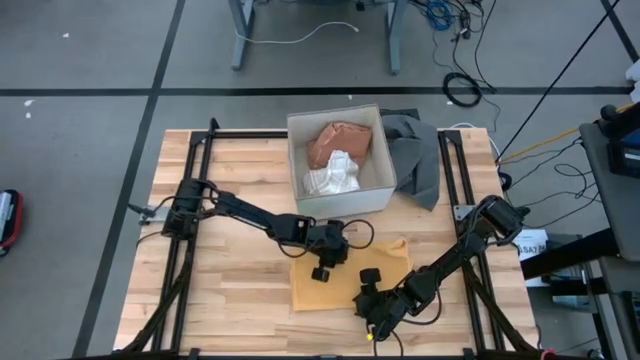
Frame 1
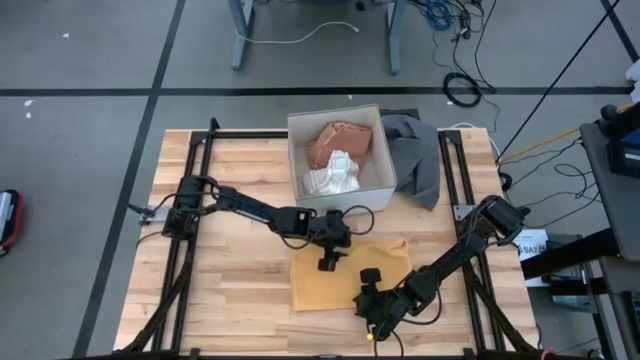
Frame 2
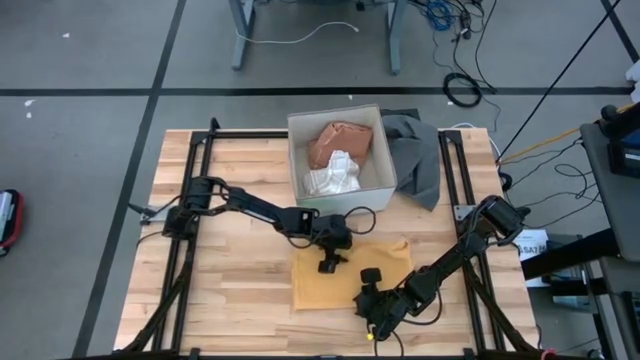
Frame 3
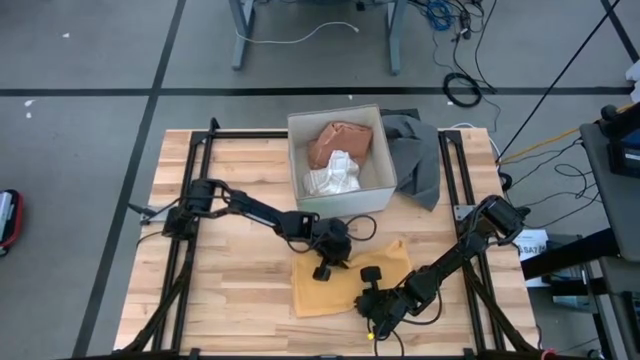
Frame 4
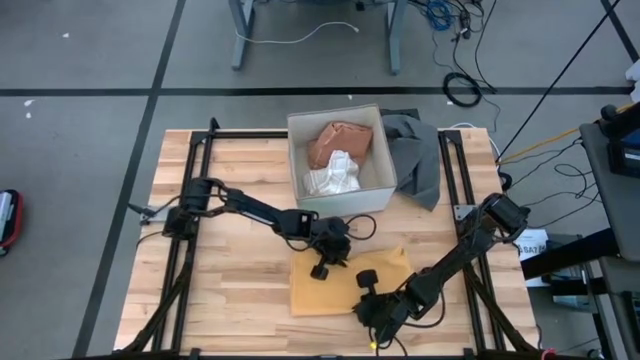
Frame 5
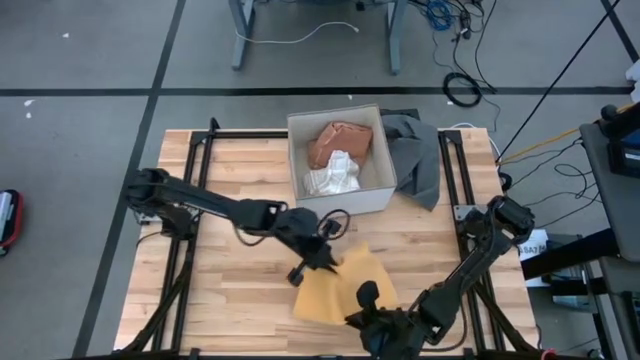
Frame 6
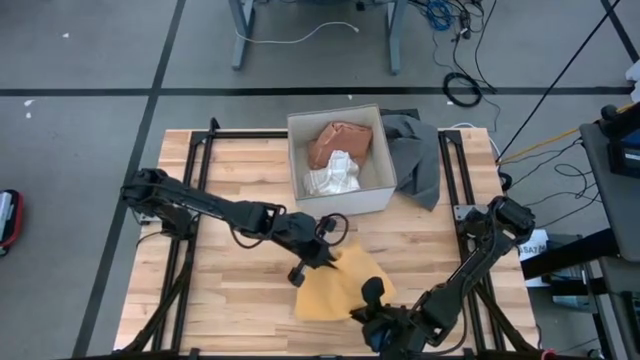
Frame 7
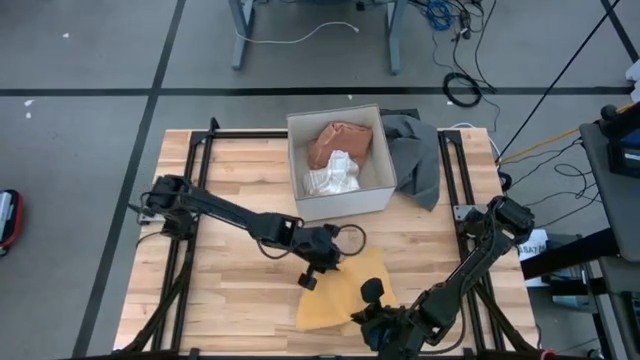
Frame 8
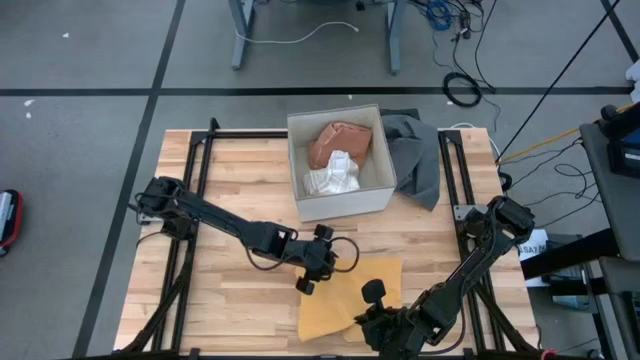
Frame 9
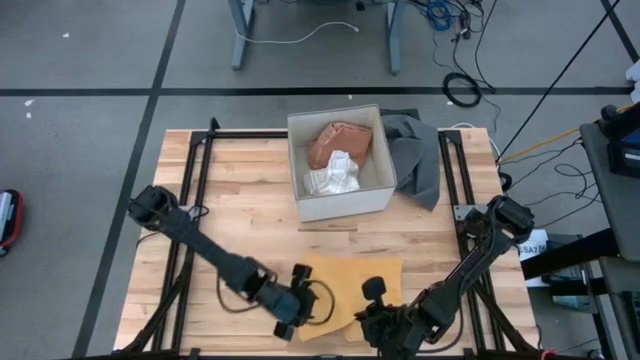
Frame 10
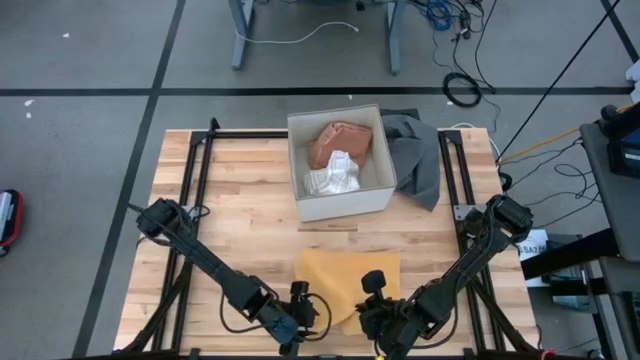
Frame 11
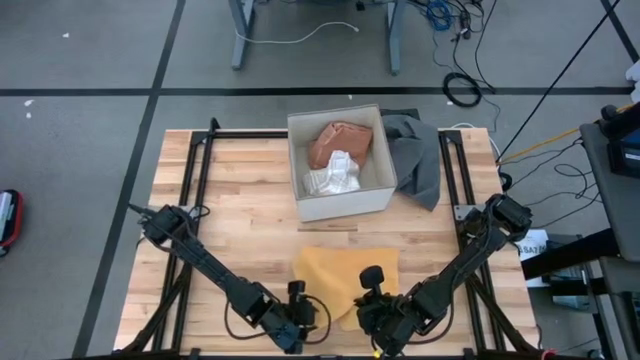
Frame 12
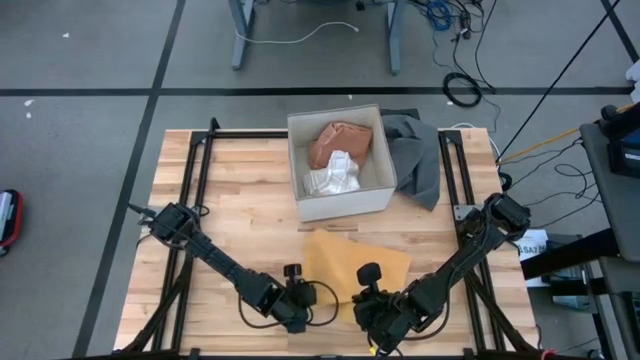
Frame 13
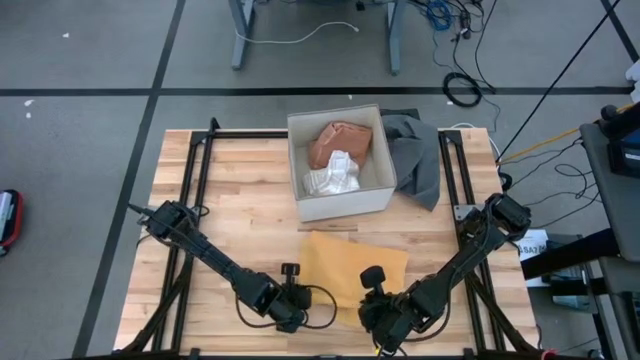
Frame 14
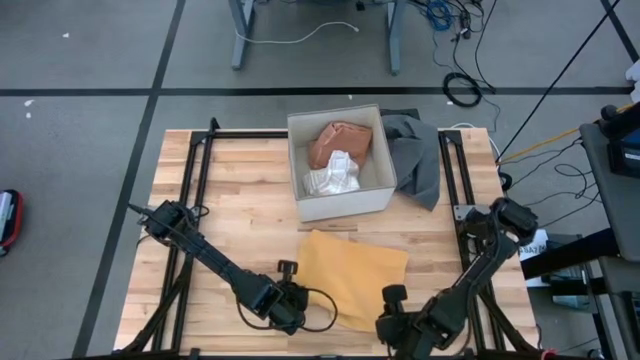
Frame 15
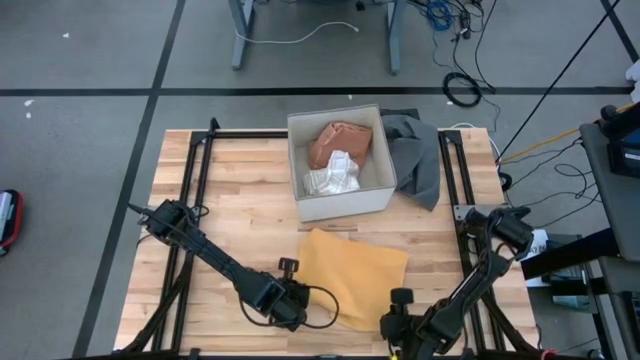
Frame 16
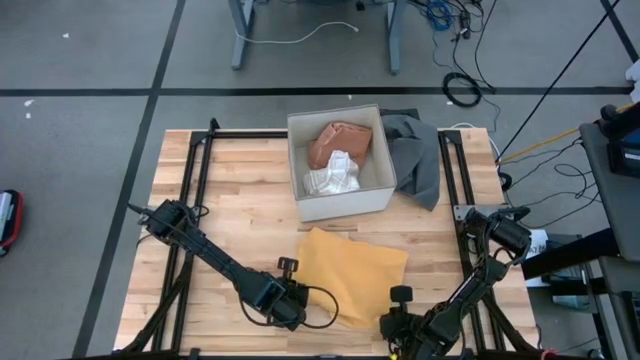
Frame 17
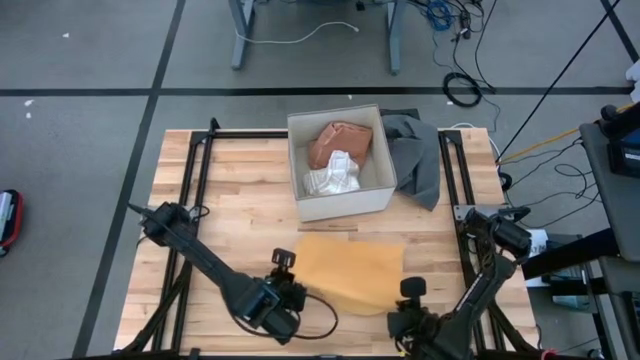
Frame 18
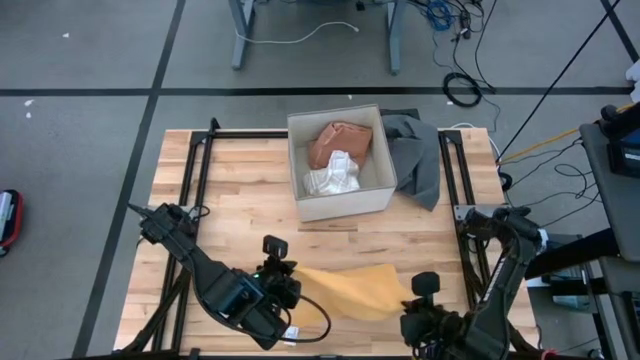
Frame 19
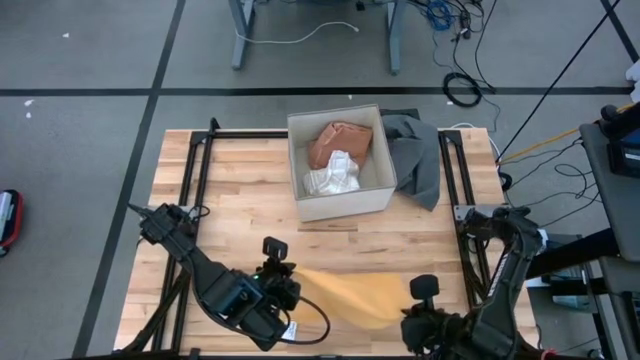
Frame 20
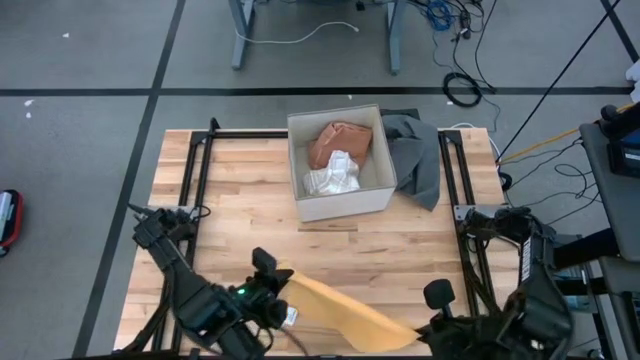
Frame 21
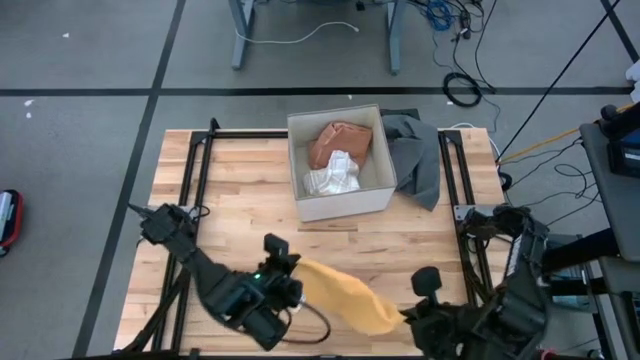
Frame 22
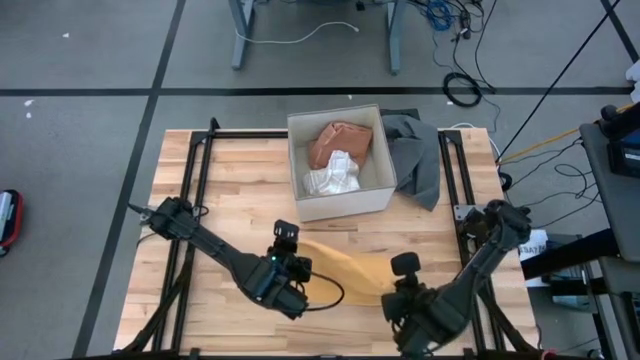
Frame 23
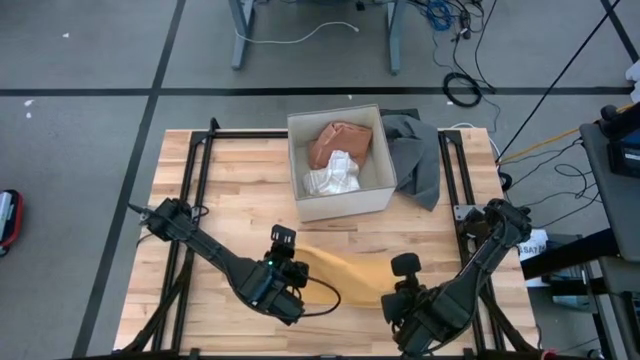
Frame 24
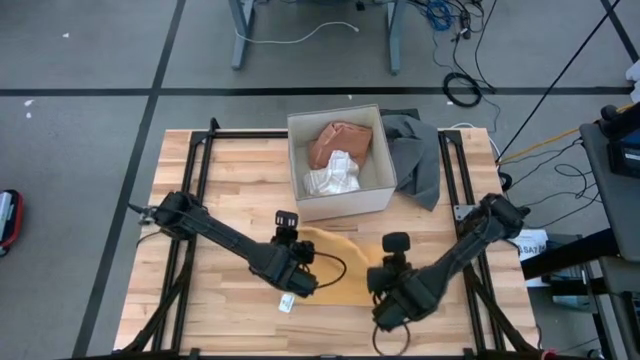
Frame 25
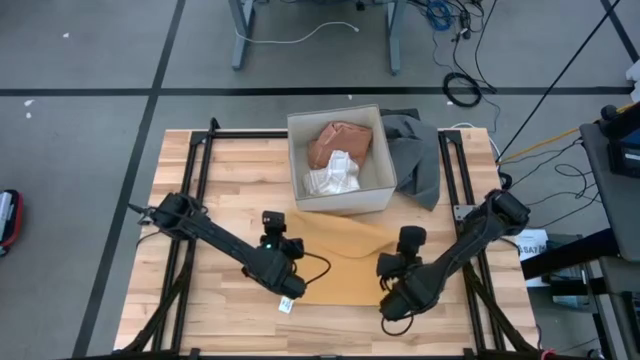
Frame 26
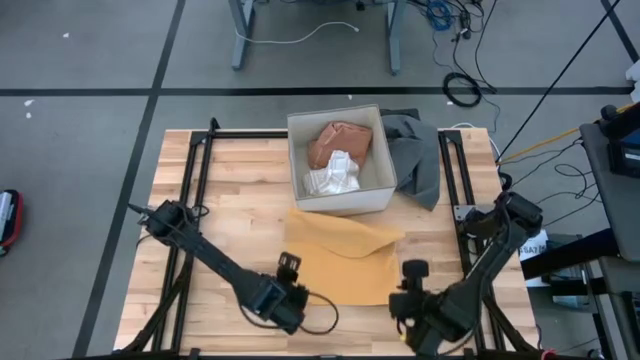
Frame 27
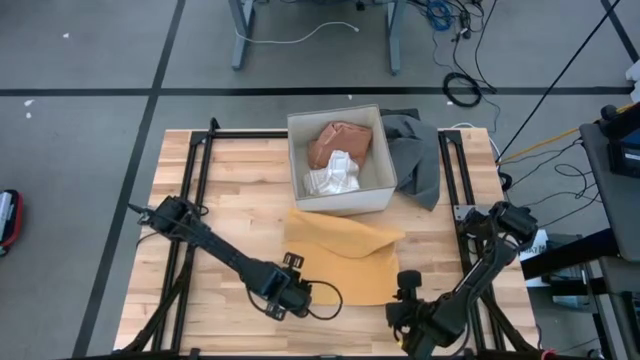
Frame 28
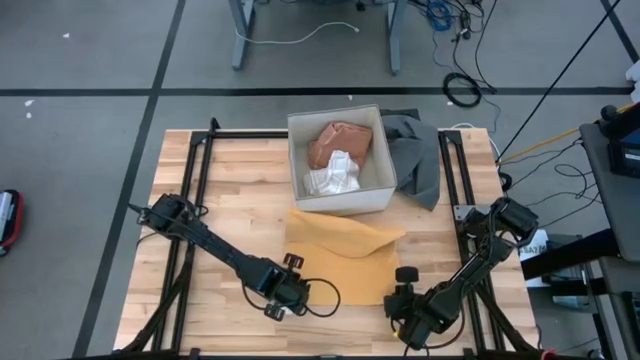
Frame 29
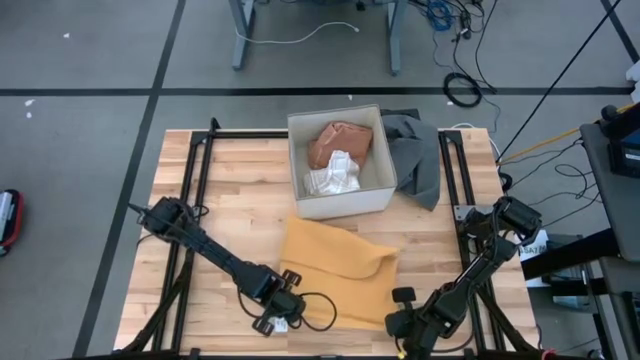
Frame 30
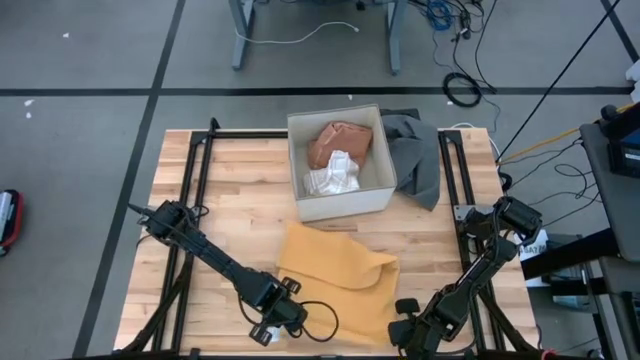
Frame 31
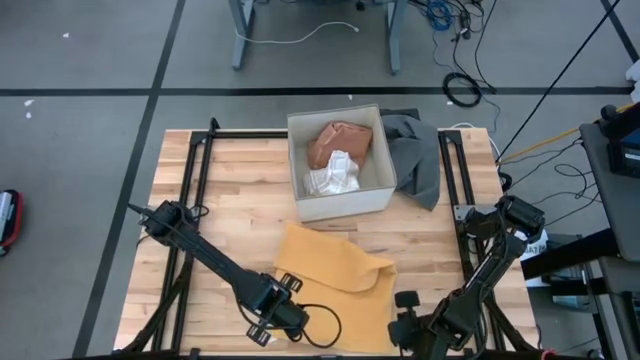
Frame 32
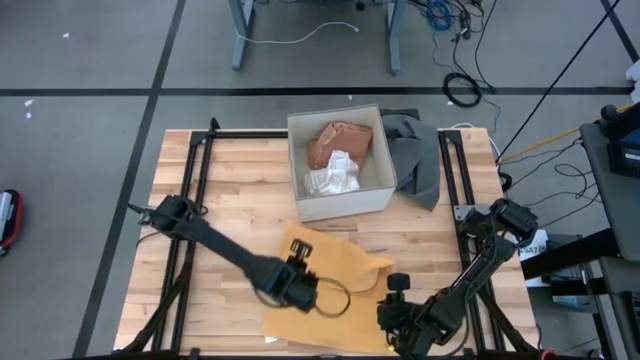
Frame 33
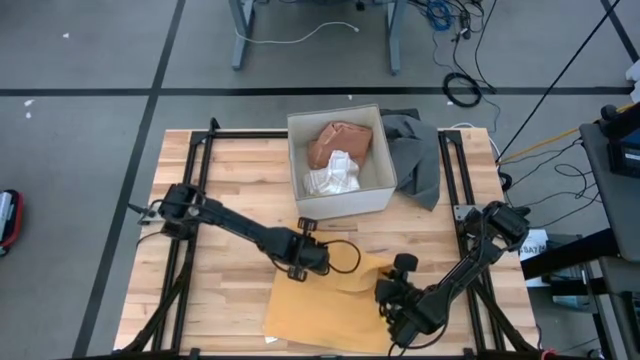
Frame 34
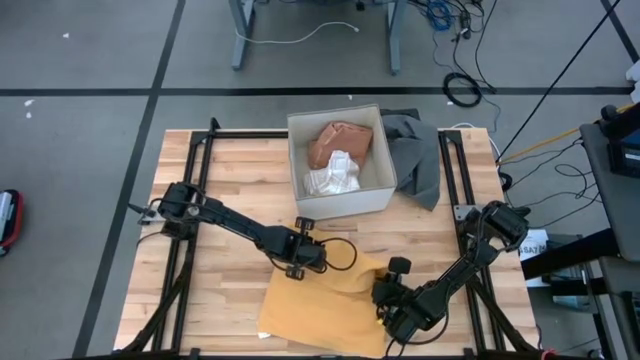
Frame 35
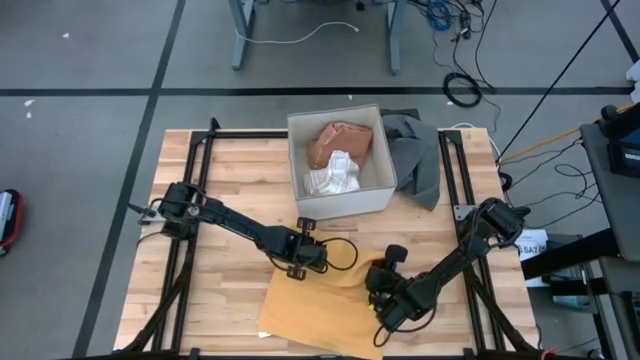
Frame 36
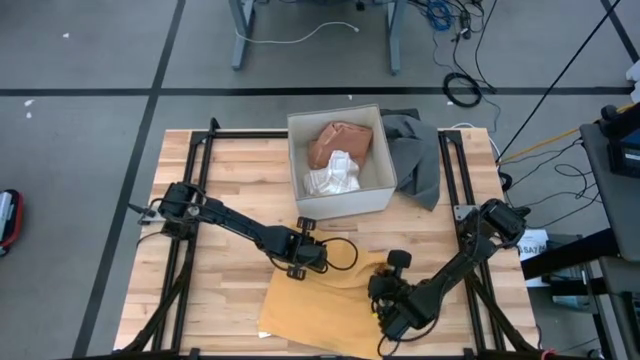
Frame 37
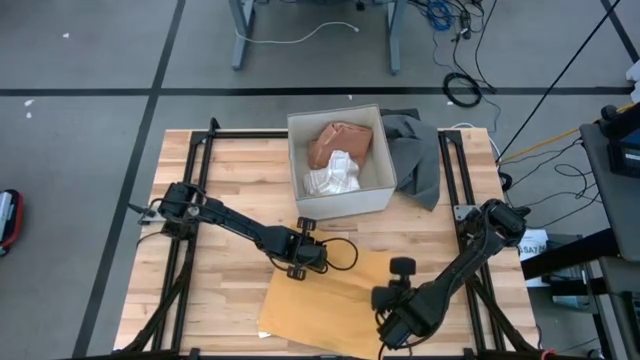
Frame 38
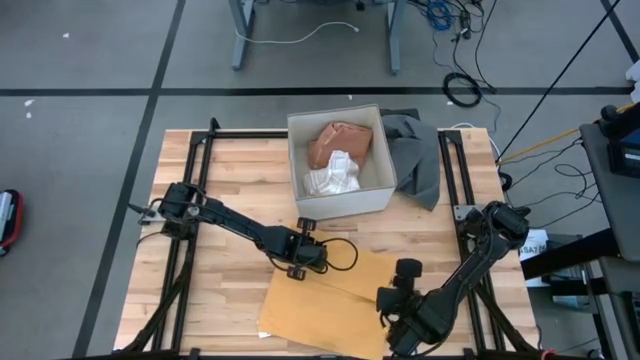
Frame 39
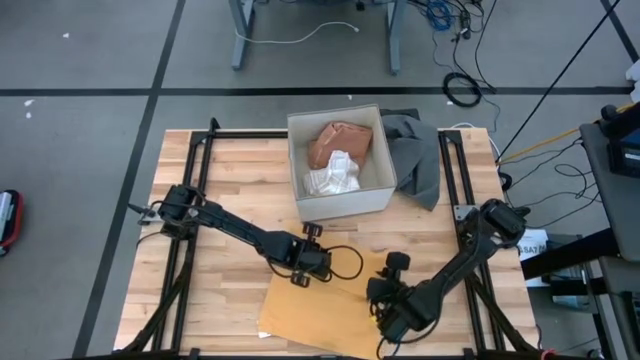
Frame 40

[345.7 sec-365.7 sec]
Task: Fold towel
Fold the orange towel
